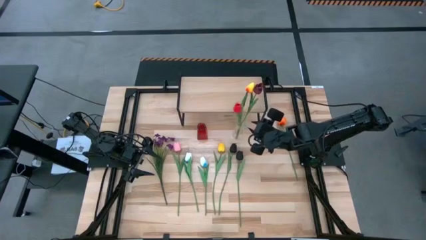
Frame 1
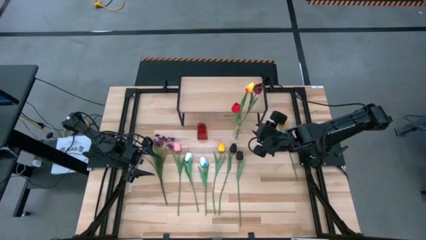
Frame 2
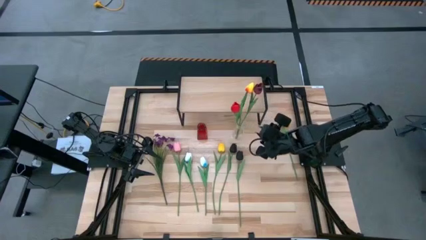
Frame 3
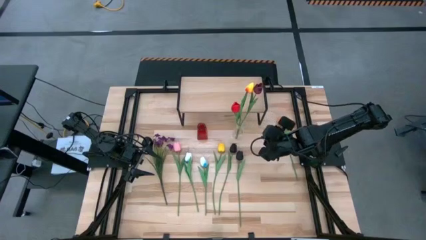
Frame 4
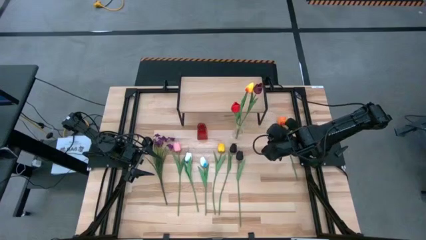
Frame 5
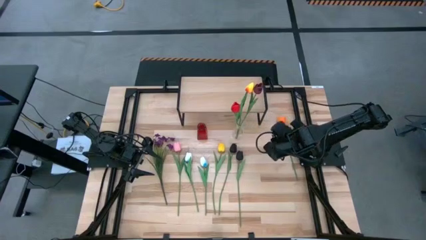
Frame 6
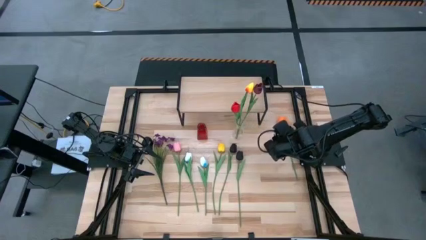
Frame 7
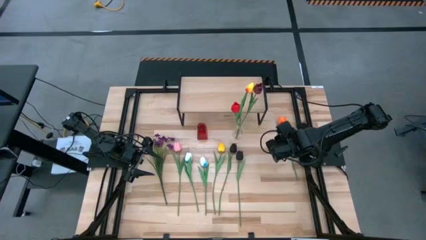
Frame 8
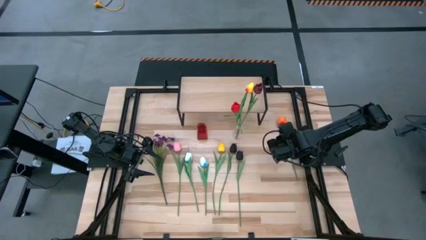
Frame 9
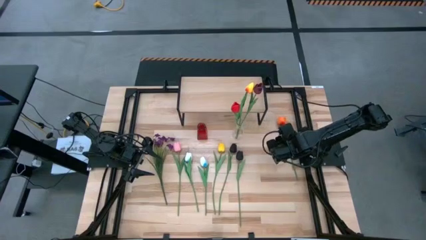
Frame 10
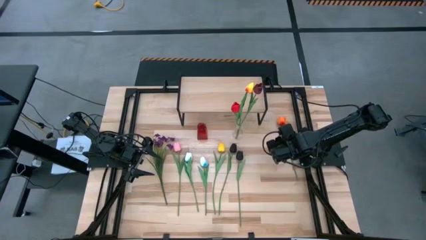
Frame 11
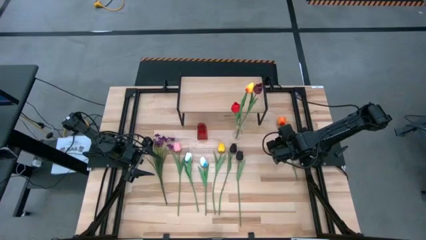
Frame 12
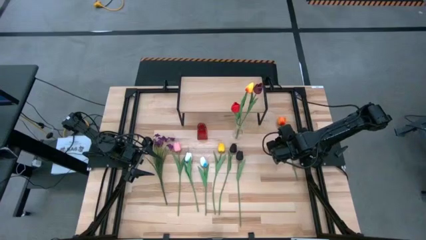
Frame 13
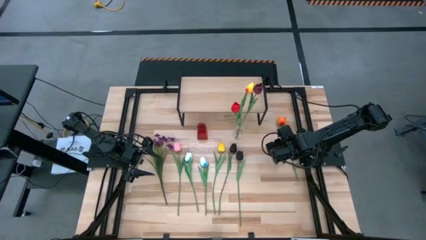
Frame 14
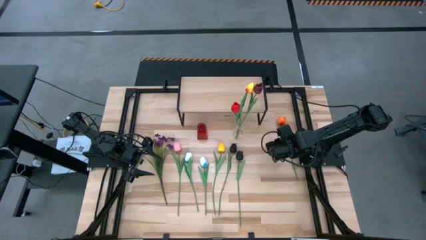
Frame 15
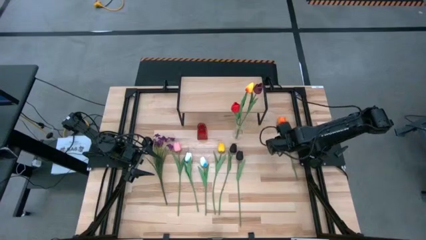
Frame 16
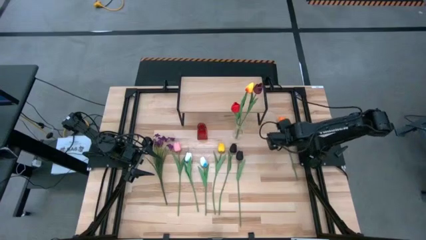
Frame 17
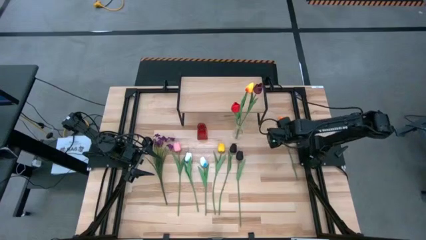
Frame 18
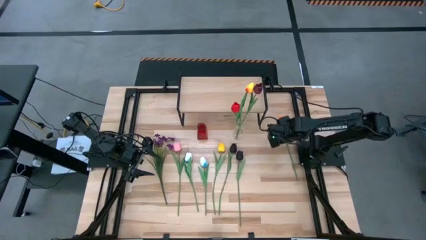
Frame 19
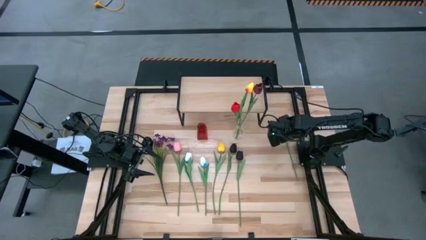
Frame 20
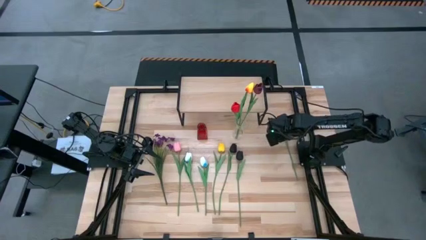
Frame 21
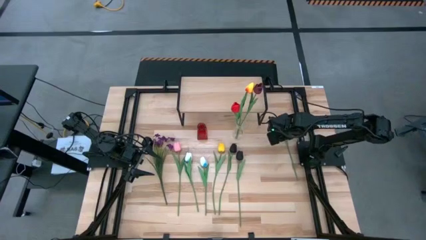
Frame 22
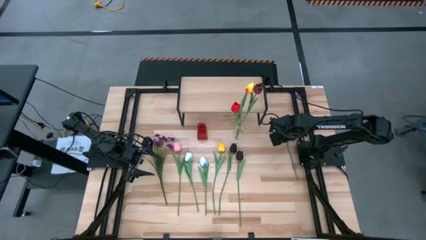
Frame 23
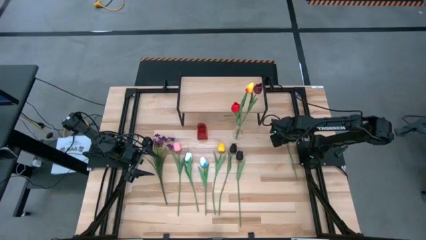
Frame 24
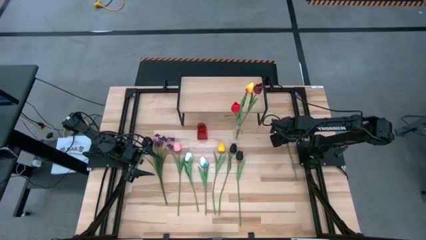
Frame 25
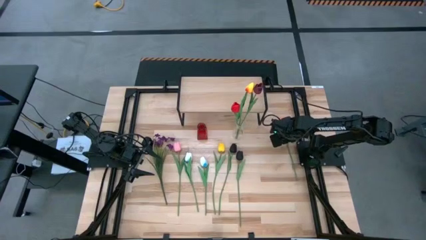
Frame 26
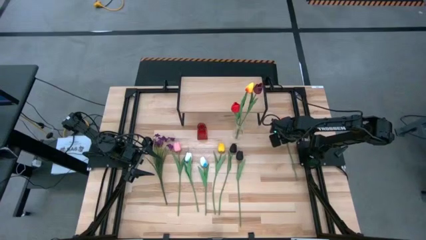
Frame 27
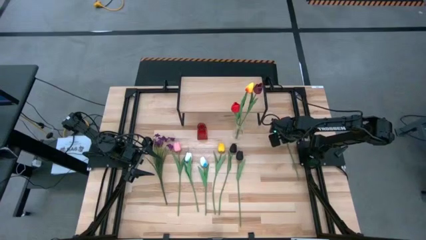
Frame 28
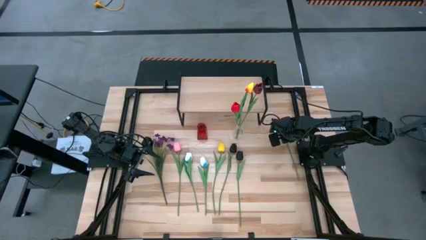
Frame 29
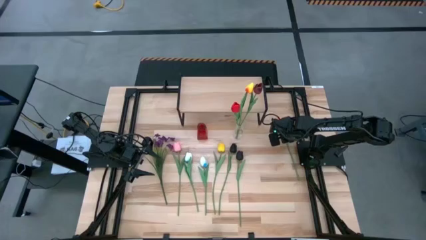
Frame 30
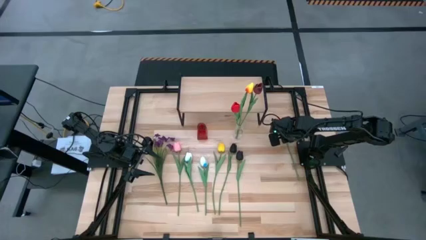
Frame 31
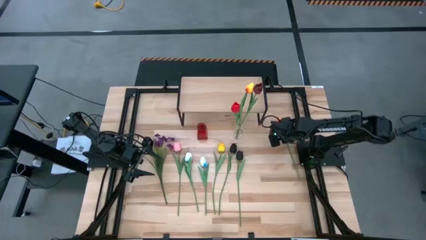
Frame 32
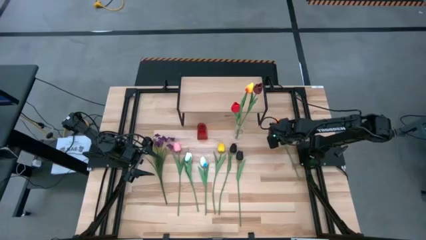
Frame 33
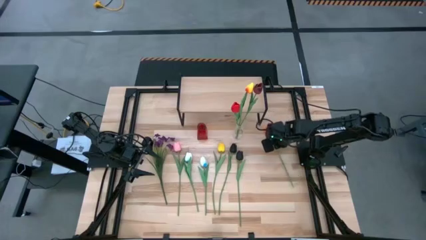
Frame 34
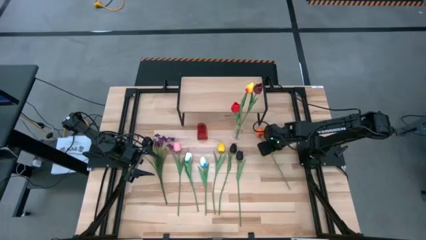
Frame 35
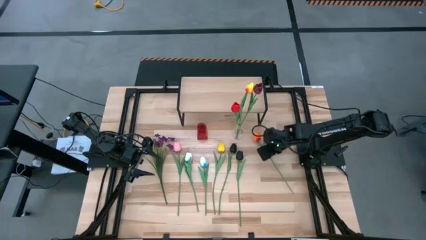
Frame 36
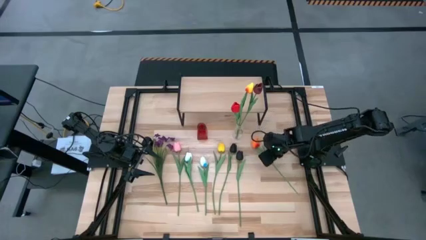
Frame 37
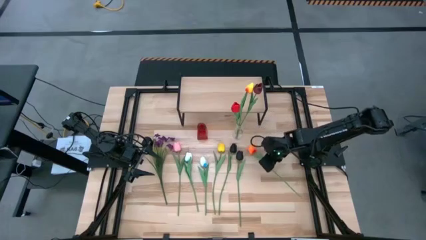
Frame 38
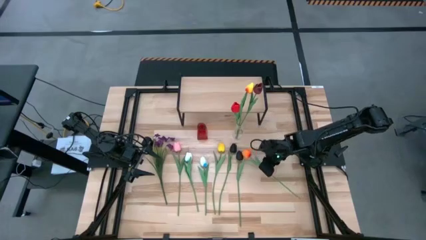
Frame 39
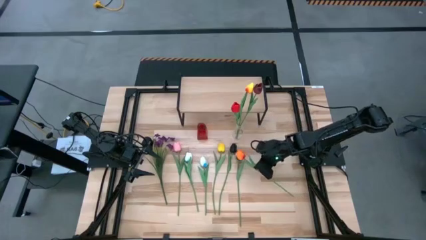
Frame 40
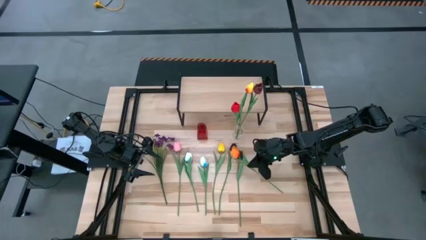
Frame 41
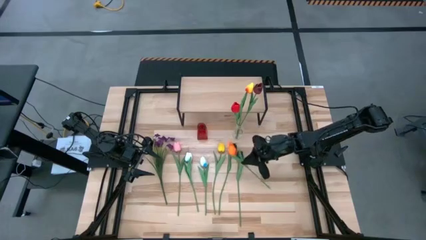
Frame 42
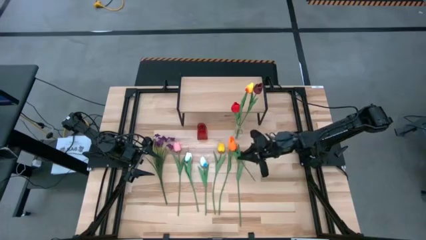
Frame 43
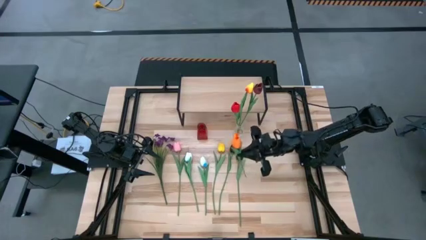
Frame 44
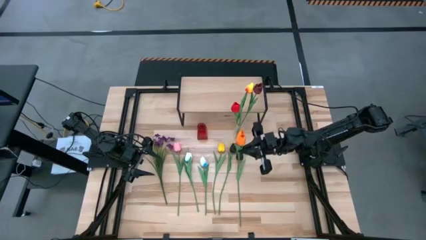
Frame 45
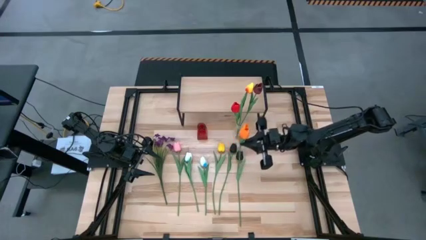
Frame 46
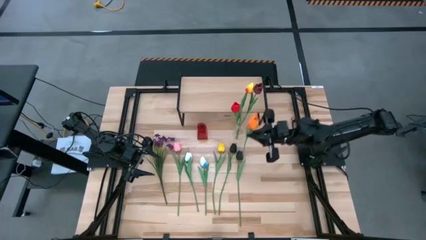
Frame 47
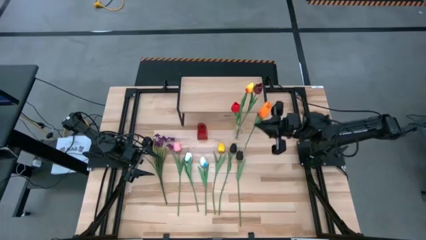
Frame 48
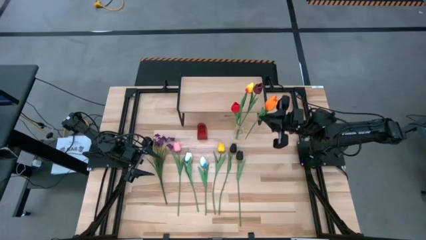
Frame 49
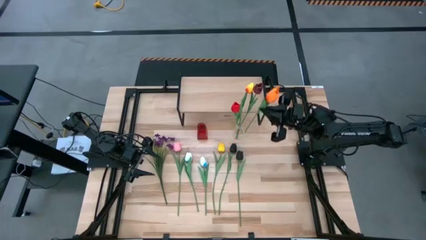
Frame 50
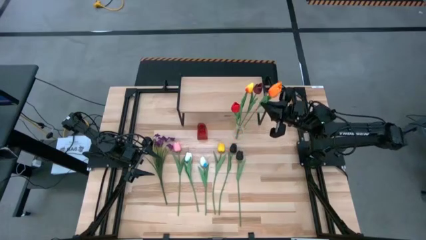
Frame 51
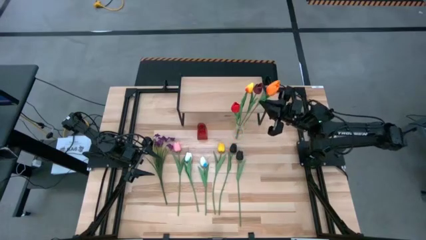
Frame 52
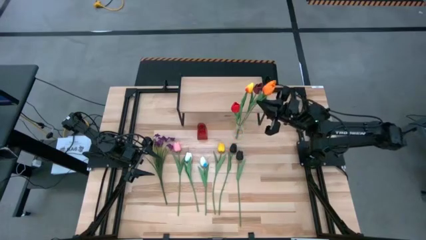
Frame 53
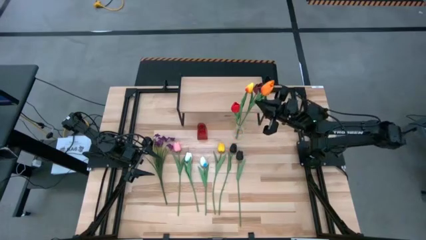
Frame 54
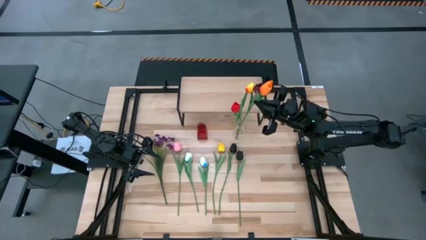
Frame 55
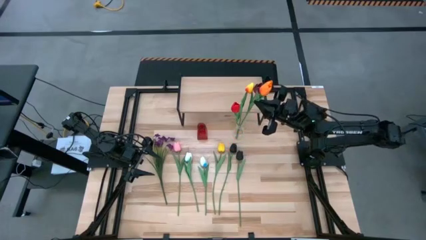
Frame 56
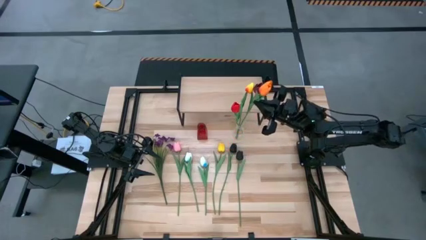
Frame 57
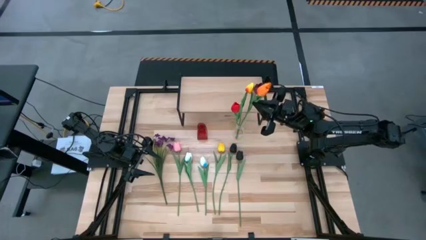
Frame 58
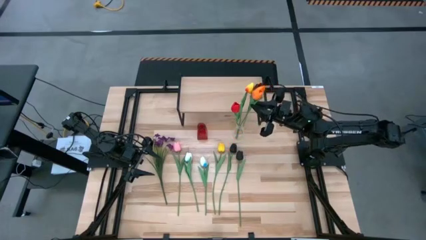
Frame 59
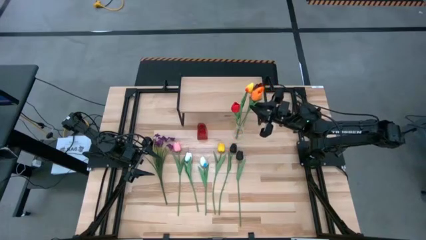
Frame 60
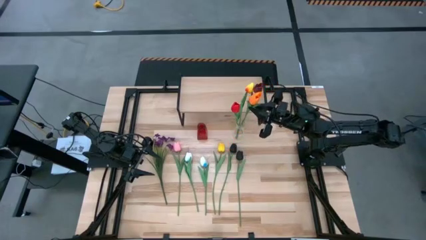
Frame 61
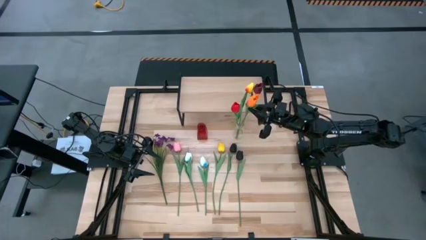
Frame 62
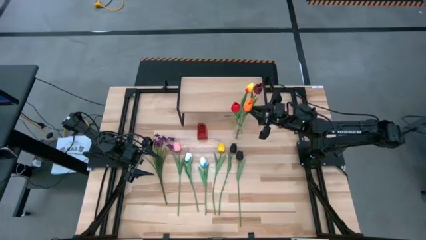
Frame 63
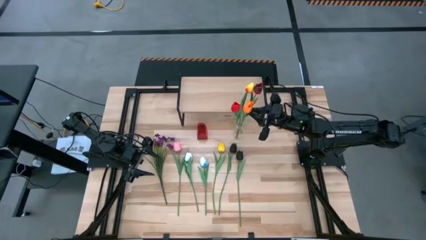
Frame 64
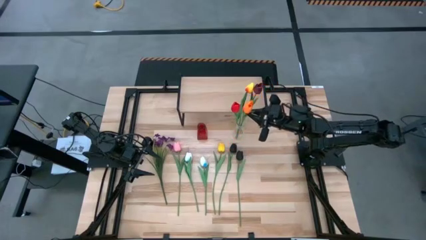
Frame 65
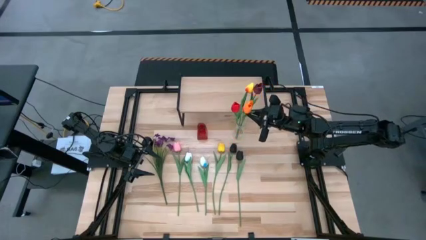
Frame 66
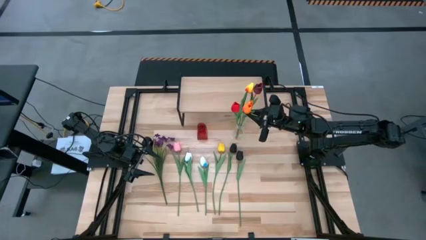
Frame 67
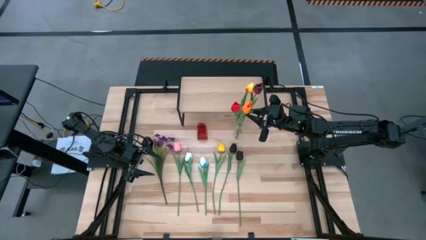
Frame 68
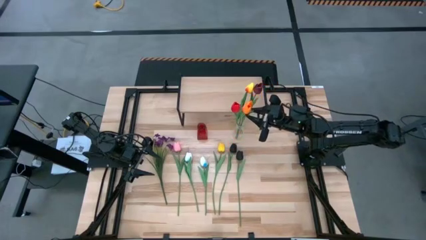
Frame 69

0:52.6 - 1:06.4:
Task: Pick and place flowers into a vace then onto a shelf
Put the orange flower into the transparent vase
